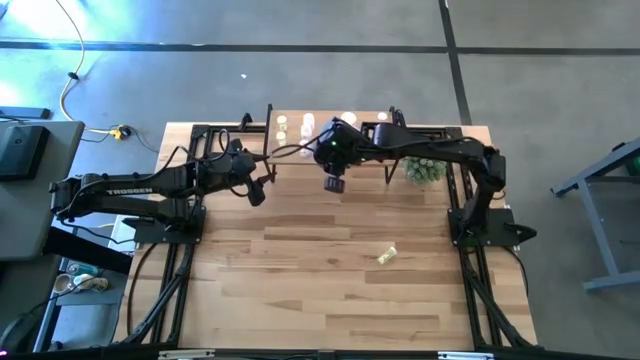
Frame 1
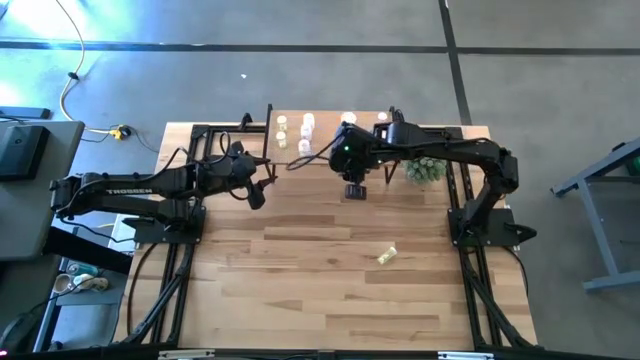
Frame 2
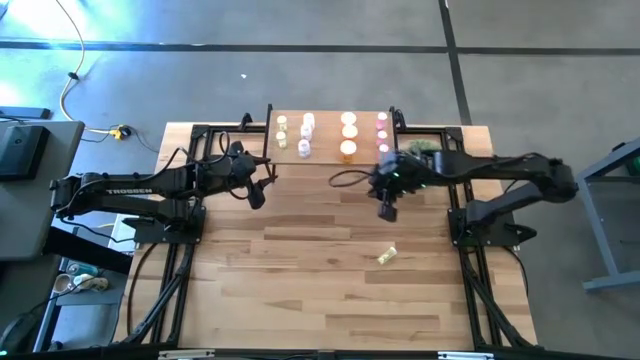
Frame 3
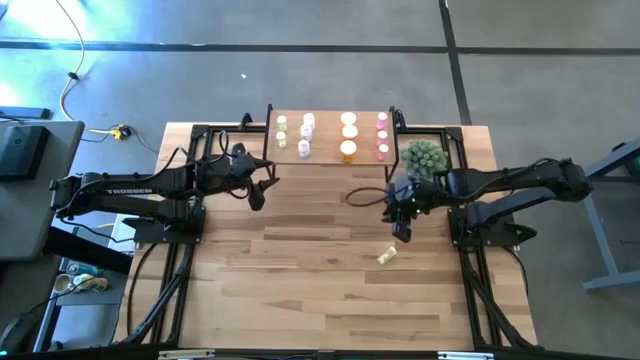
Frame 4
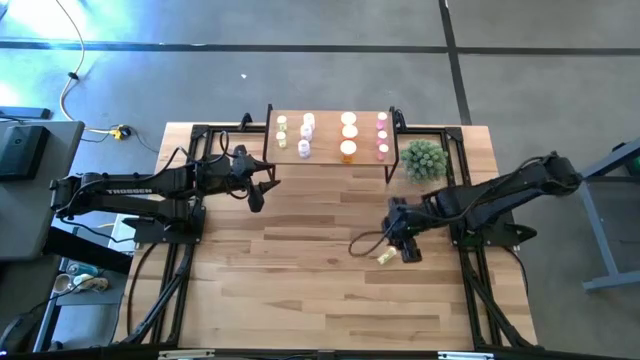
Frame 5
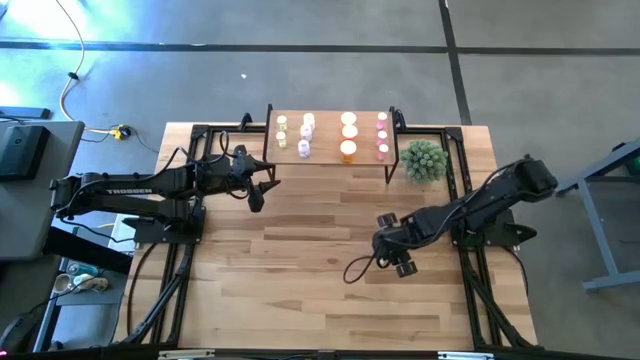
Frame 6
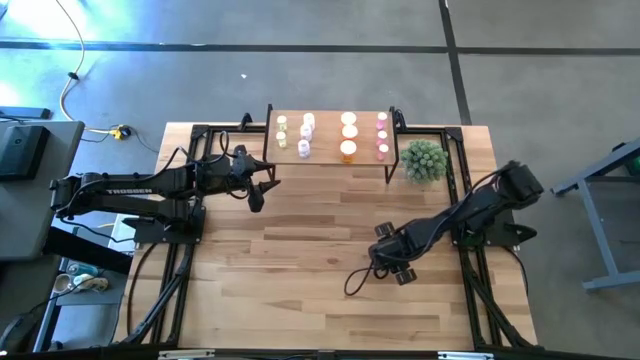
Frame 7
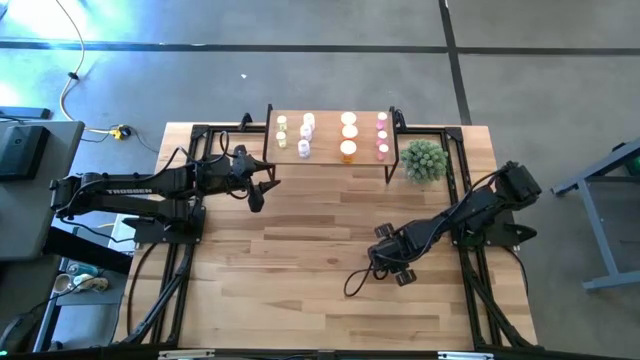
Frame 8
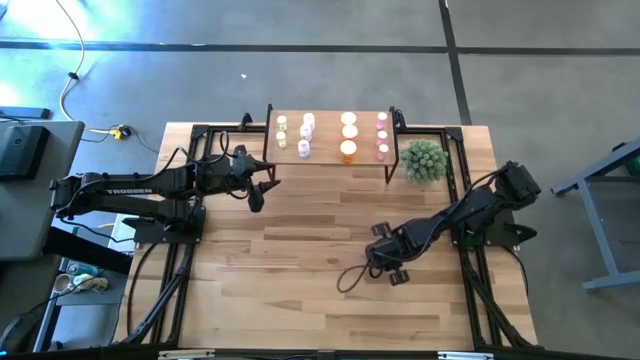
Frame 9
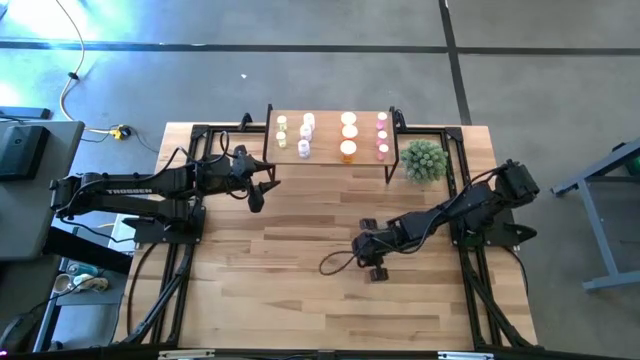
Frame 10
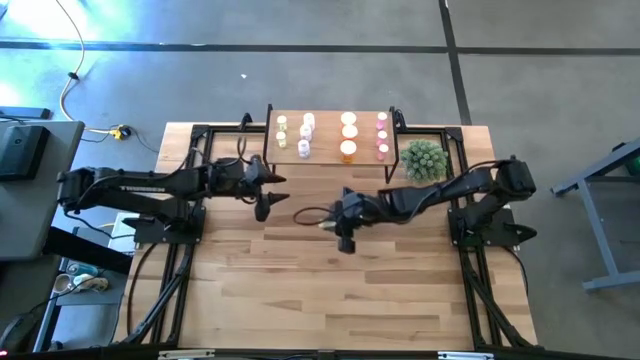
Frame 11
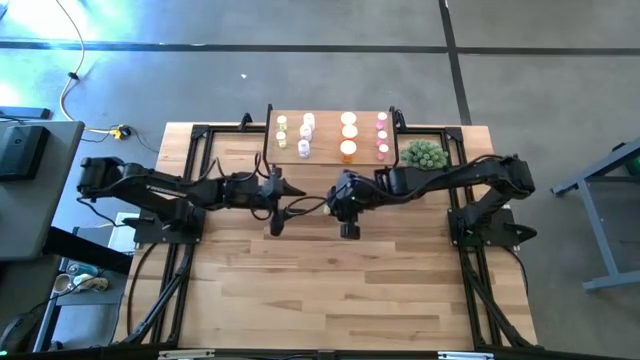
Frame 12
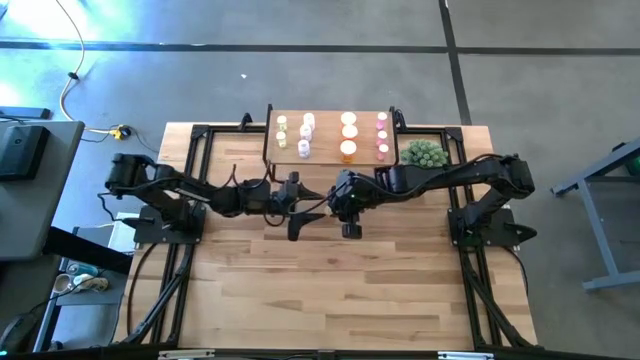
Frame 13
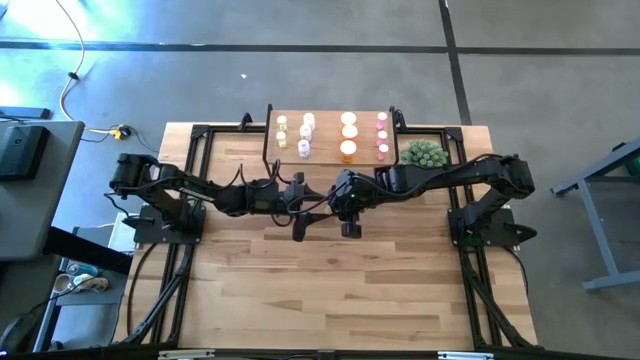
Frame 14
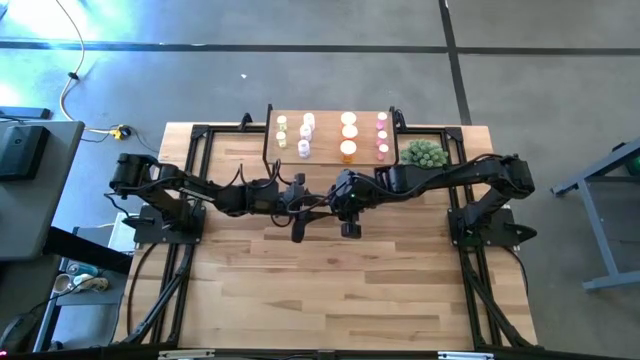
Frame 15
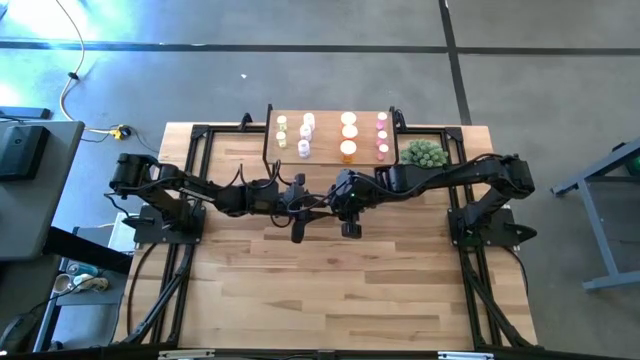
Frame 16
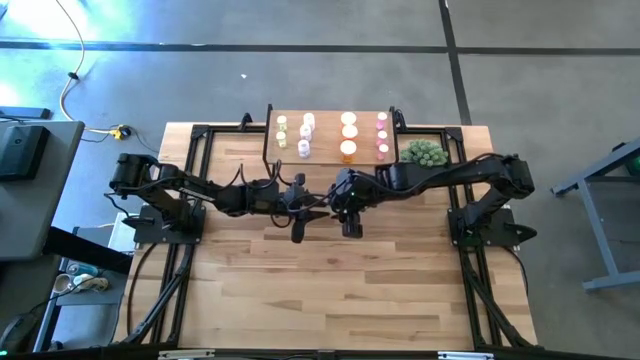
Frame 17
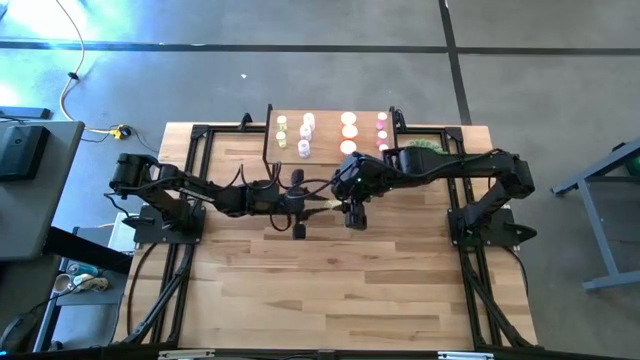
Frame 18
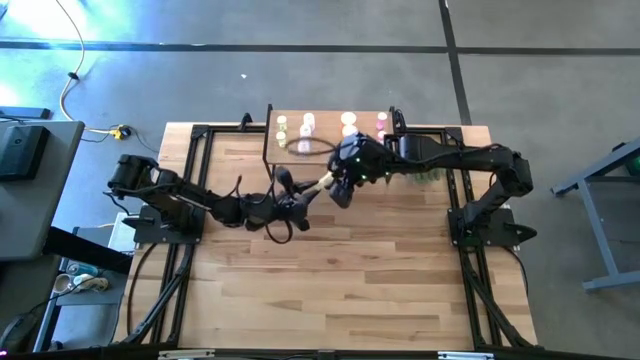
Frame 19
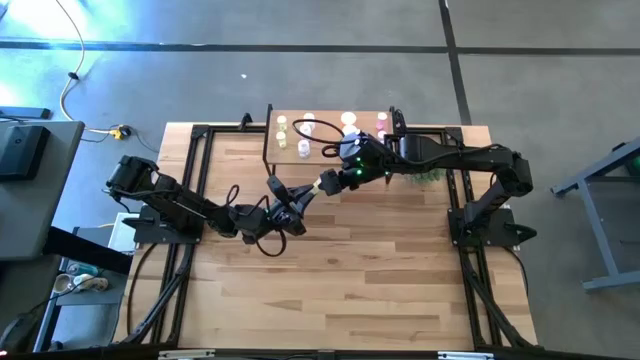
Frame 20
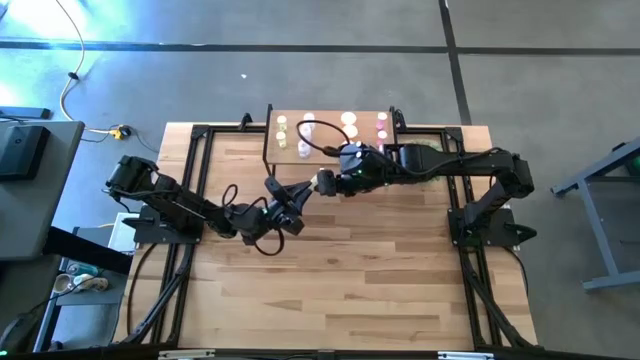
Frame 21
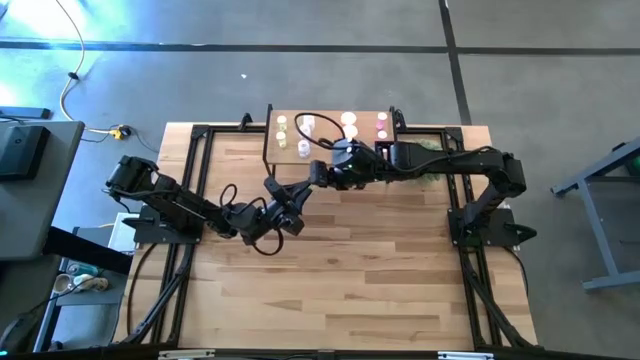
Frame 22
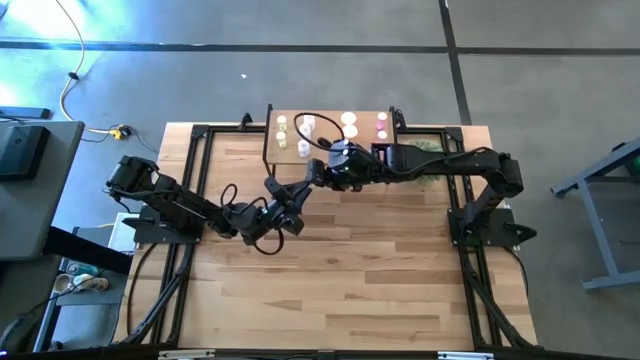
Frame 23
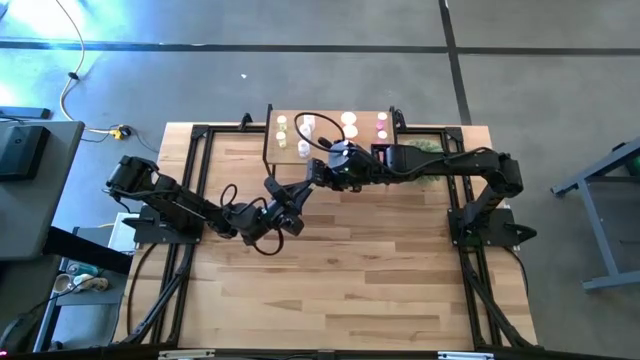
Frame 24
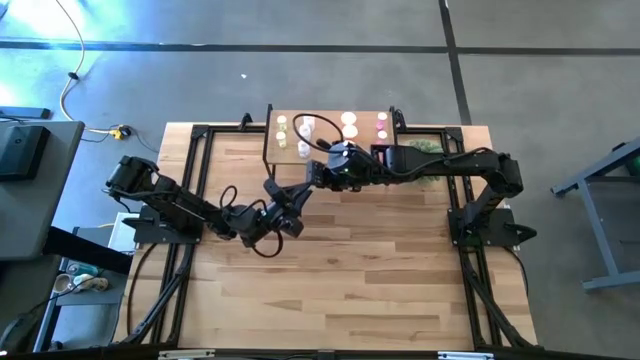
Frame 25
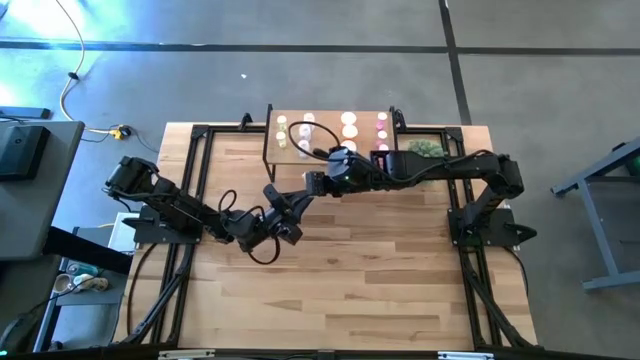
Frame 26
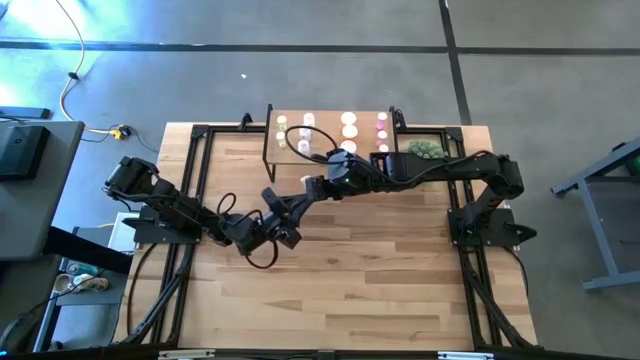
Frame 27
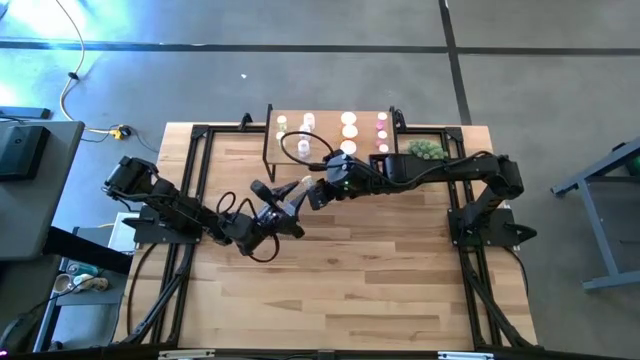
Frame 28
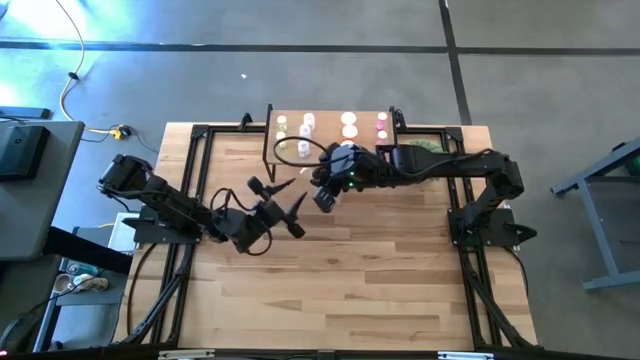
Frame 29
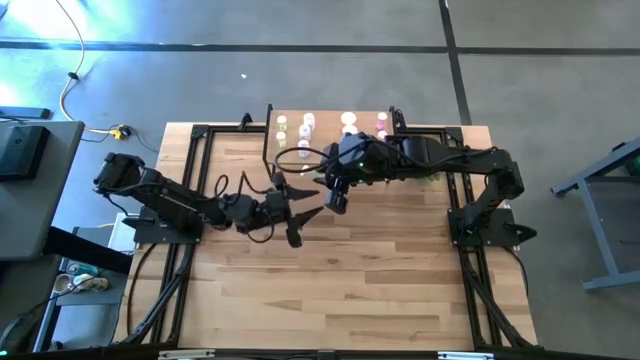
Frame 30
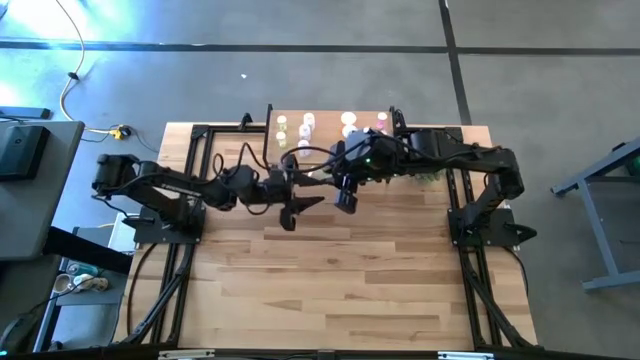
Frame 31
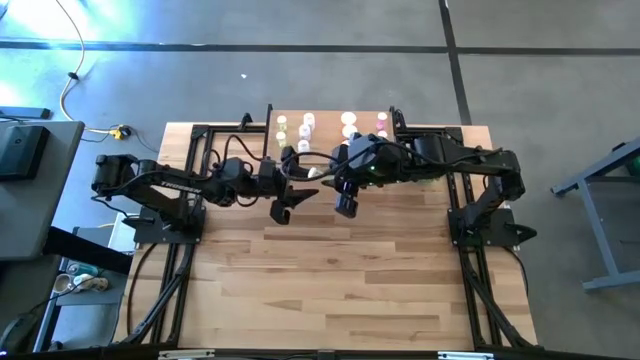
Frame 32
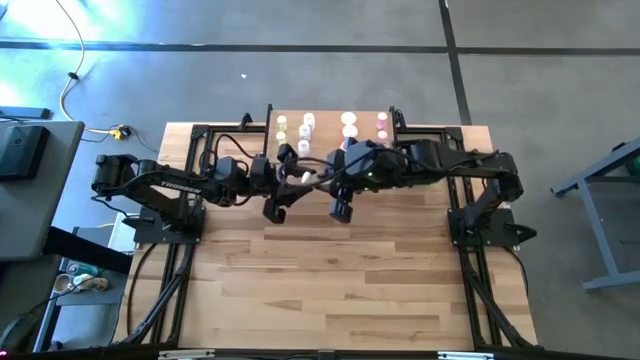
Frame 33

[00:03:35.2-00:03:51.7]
Task: Pick and place medicine bottles onto shelf by color
Put the yellow pill bottle aligned with the other yellow pill bottle on the shelf

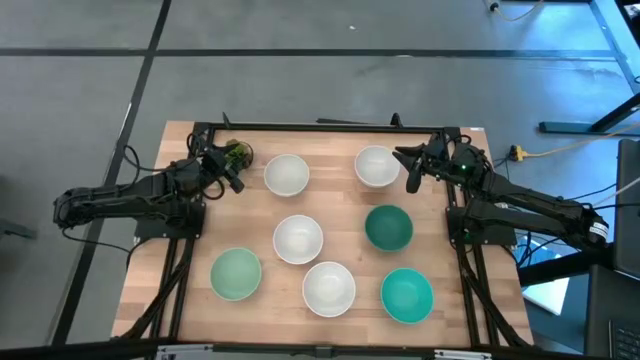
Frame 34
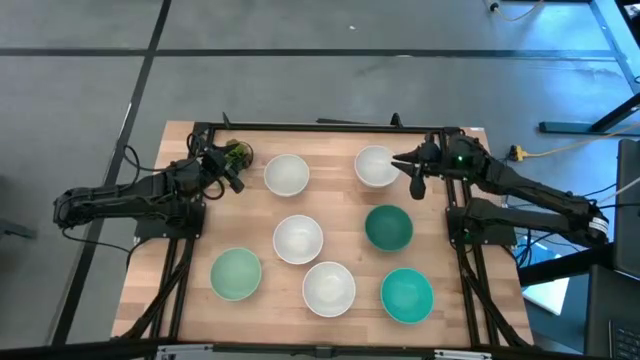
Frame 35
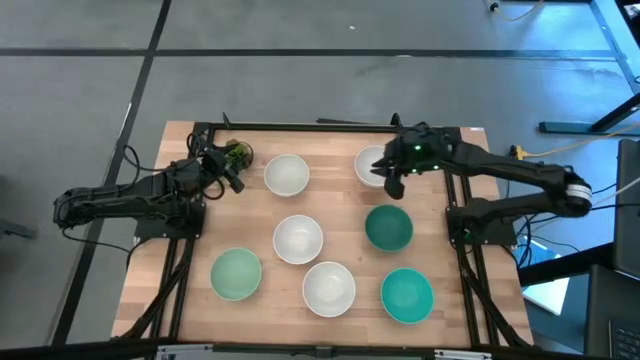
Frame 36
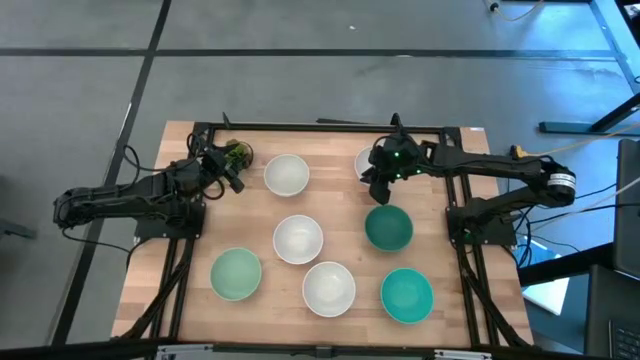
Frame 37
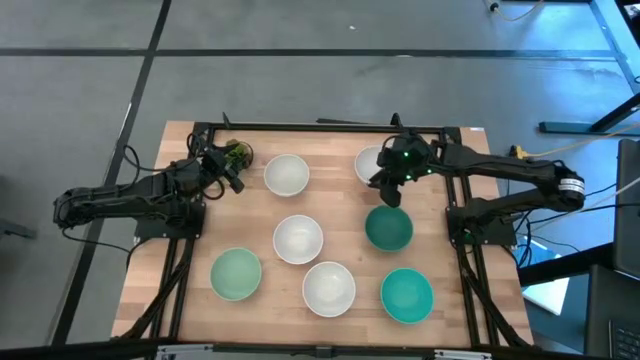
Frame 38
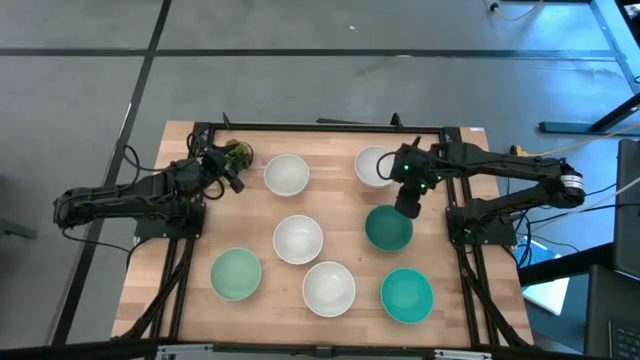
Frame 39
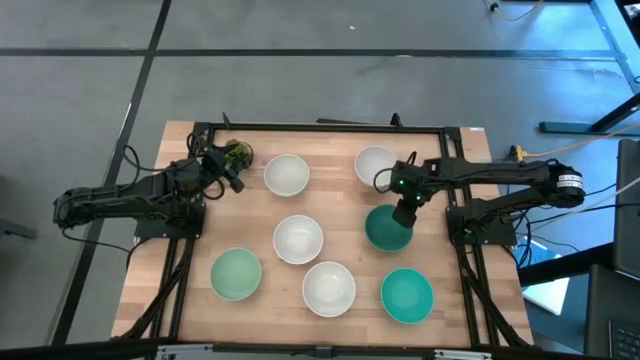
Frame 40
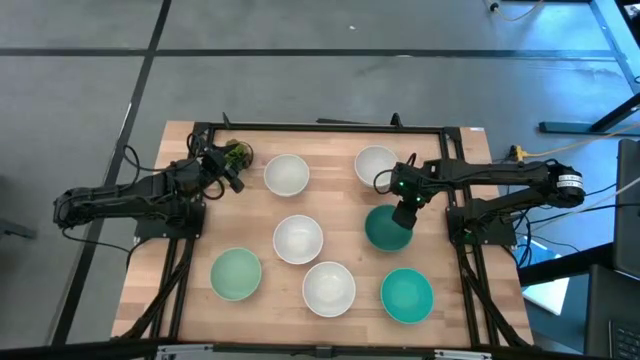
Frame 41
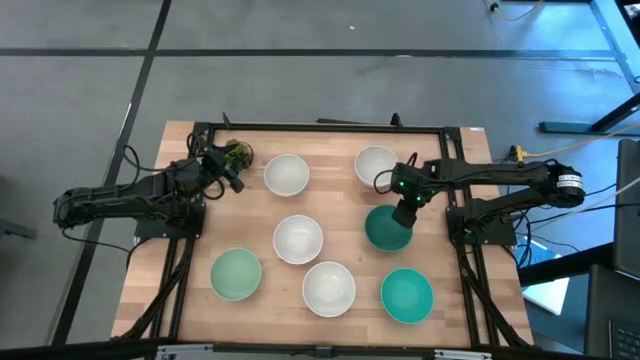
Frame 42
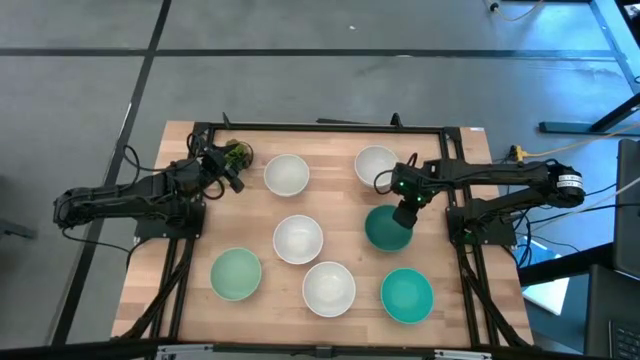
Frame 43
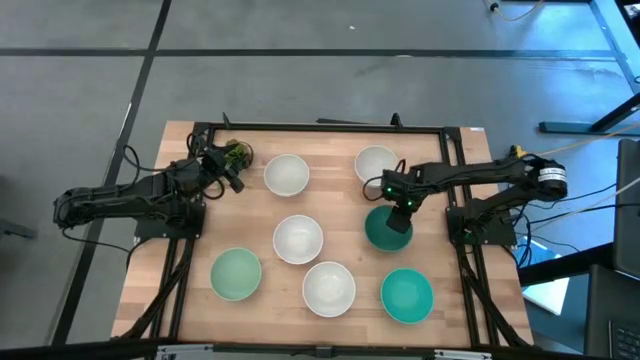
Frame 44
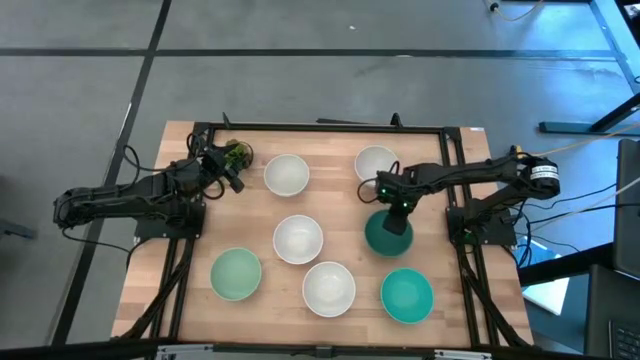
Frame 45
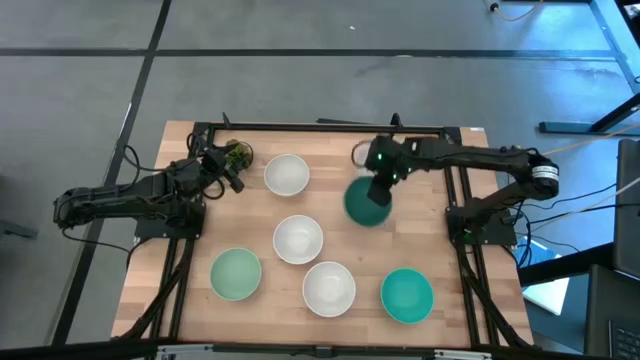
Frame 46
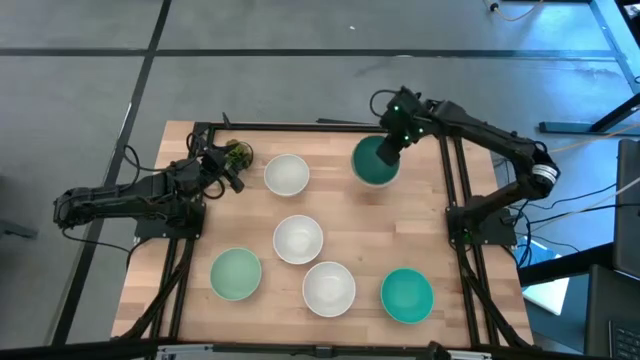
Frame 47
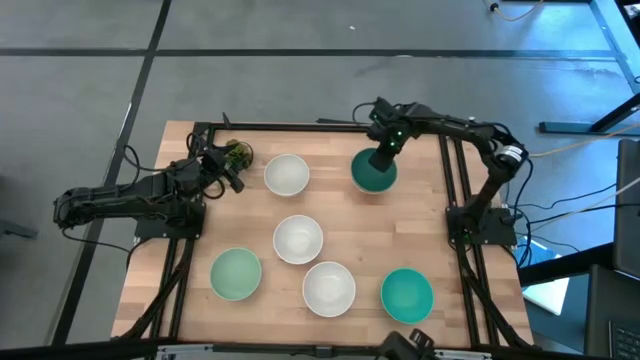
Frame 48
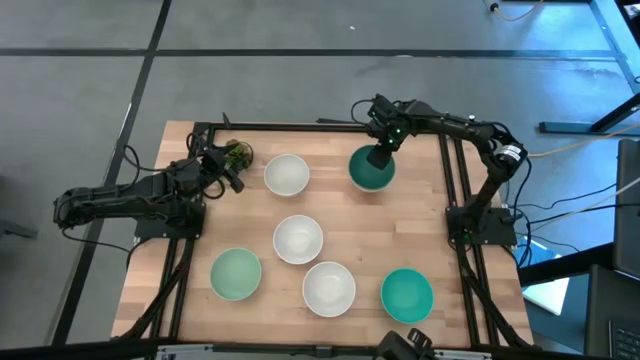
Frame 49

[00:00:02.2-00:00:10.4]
Task: Nest bowls inside each other
Stack the dark green bowl on top of the white bowl
